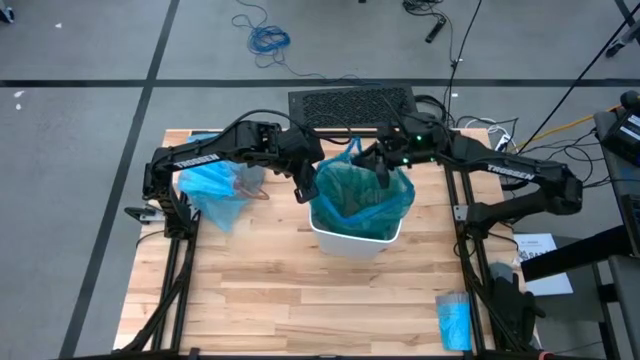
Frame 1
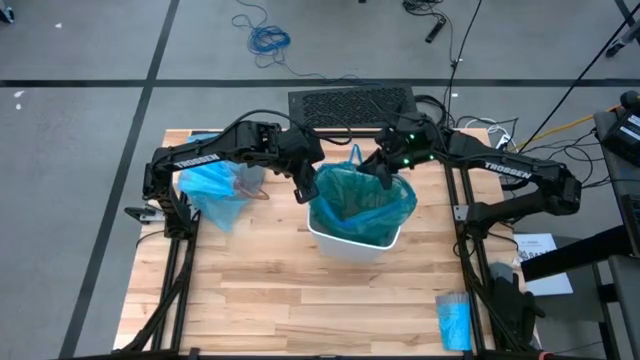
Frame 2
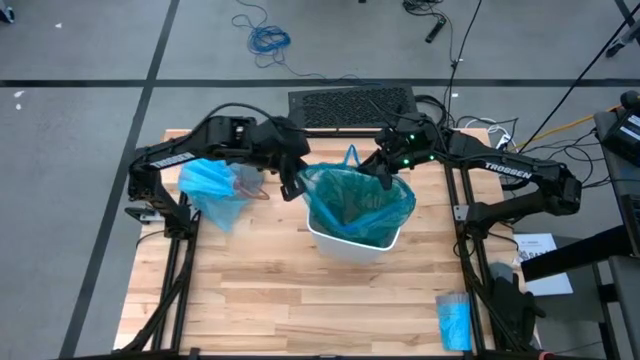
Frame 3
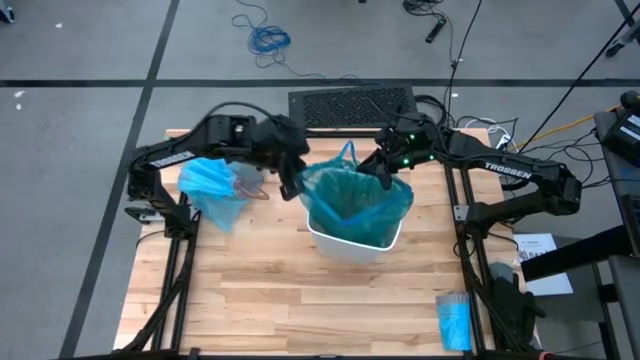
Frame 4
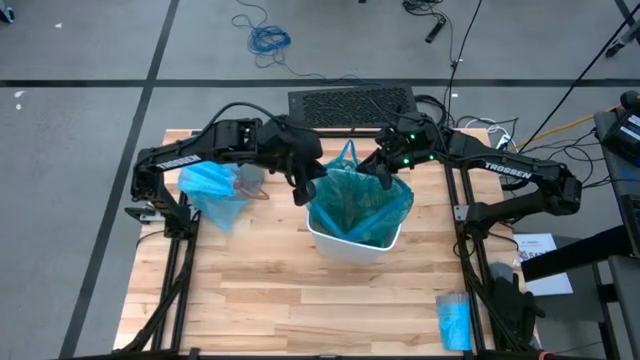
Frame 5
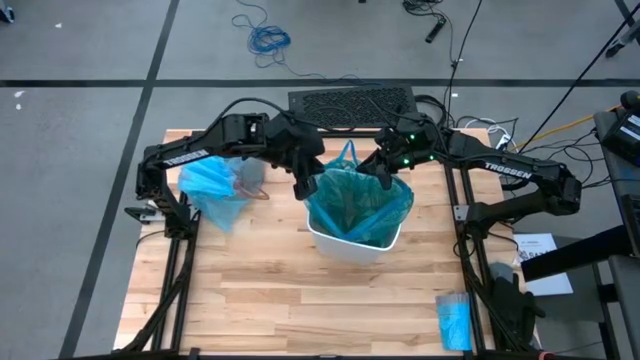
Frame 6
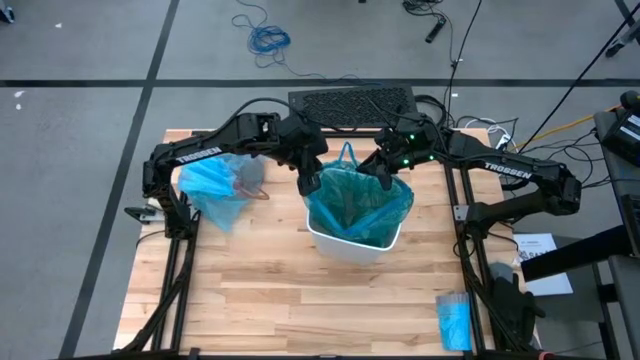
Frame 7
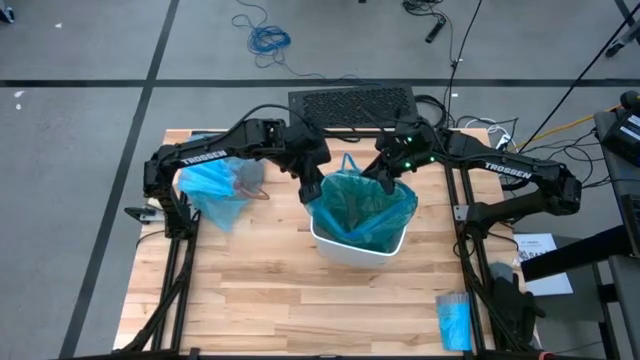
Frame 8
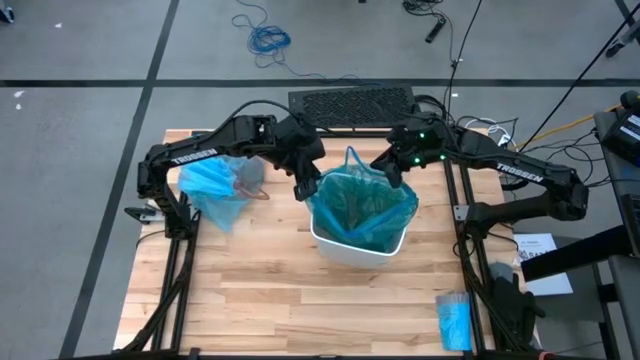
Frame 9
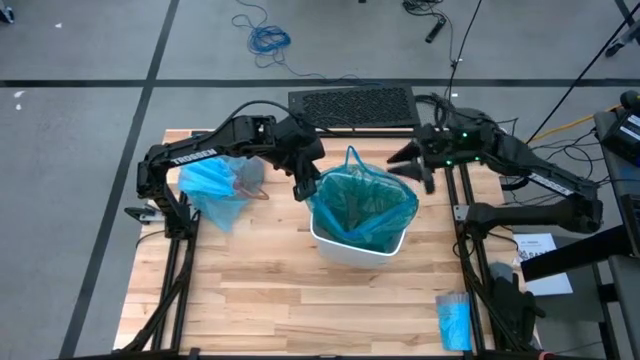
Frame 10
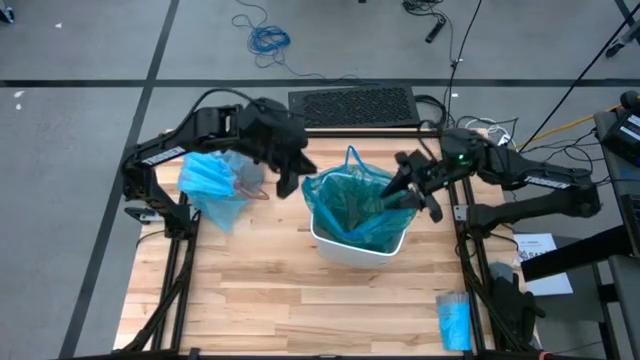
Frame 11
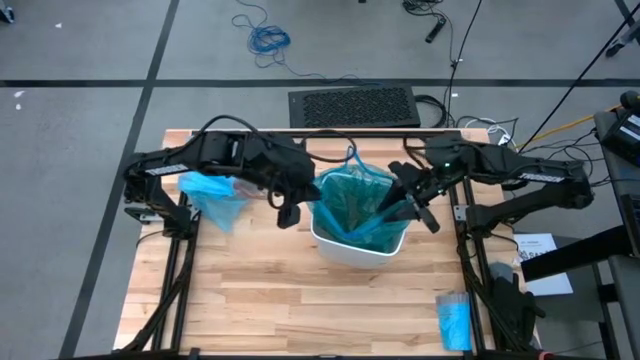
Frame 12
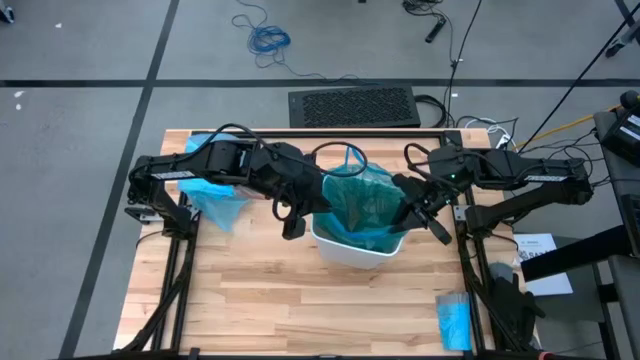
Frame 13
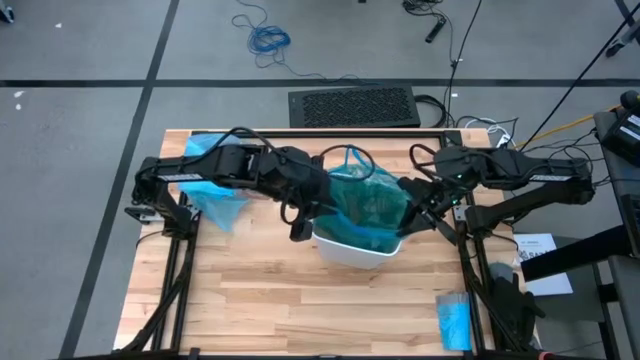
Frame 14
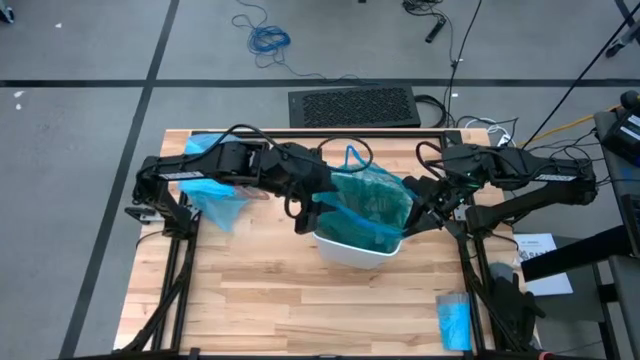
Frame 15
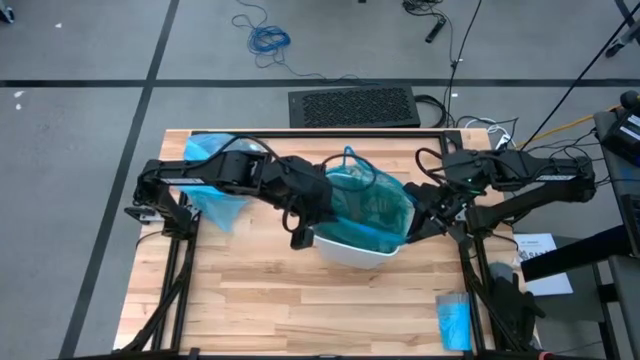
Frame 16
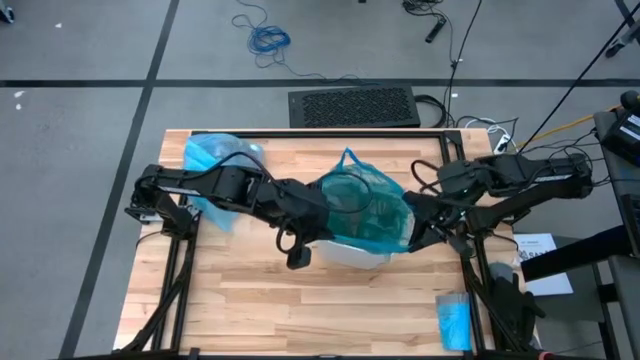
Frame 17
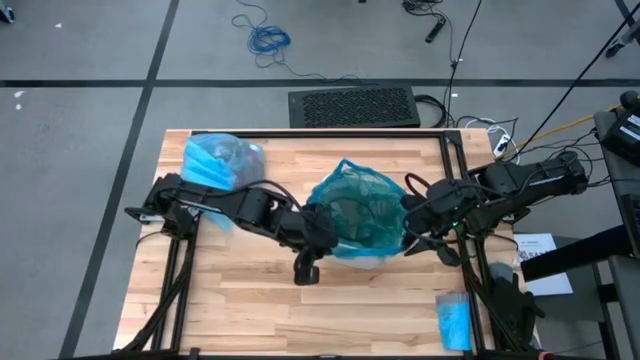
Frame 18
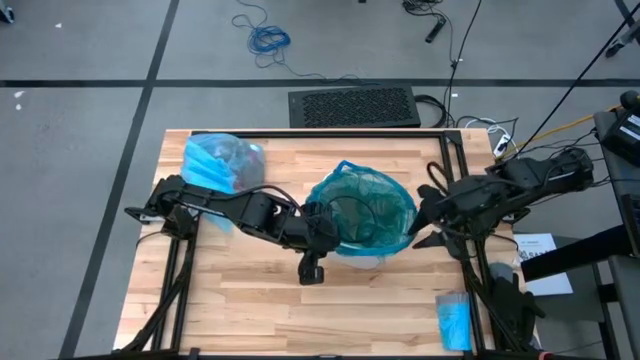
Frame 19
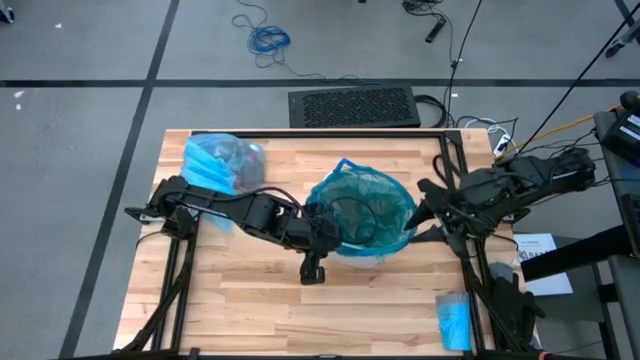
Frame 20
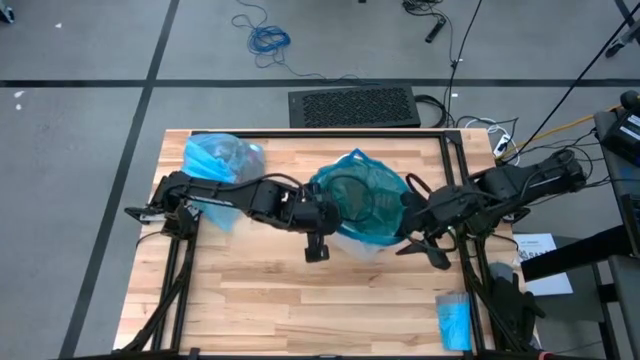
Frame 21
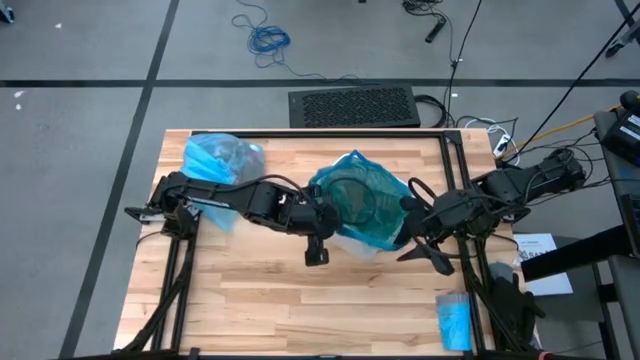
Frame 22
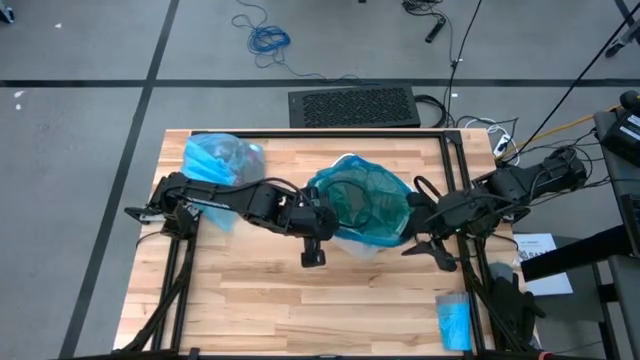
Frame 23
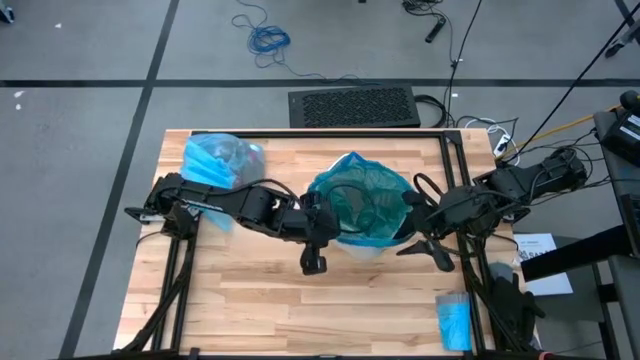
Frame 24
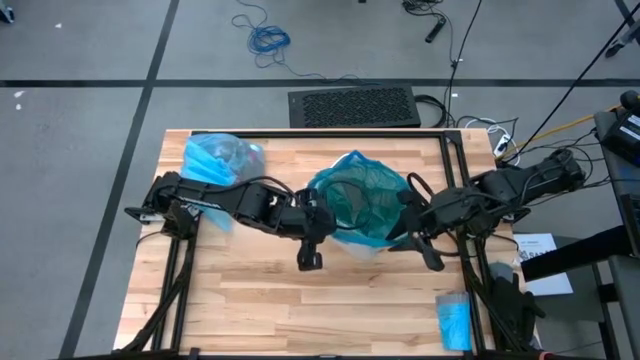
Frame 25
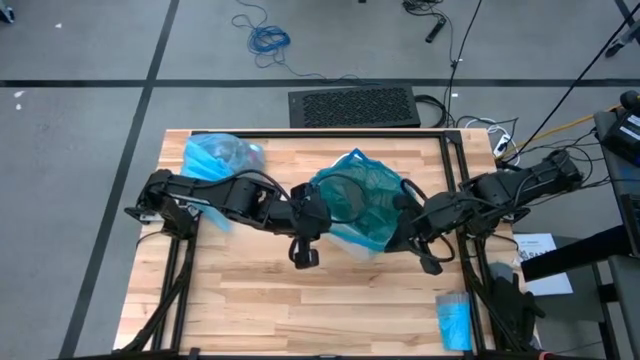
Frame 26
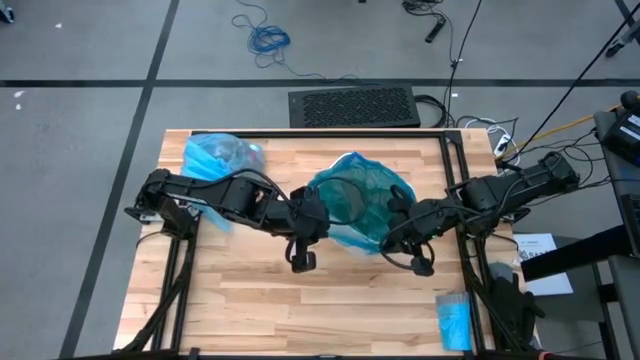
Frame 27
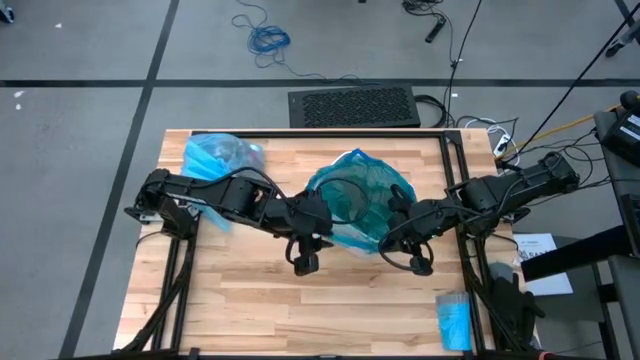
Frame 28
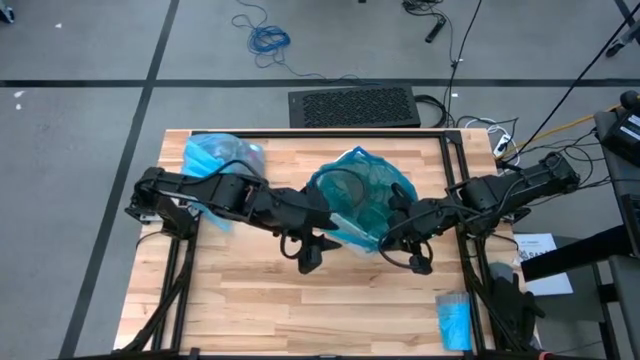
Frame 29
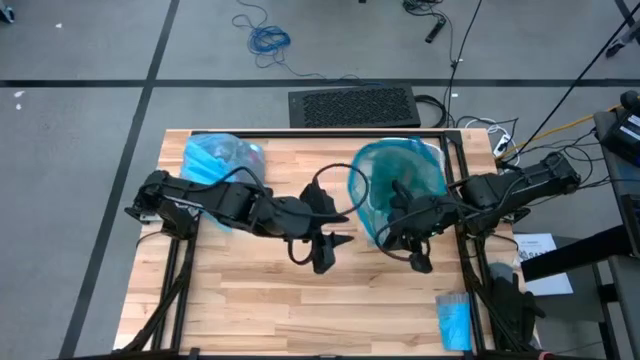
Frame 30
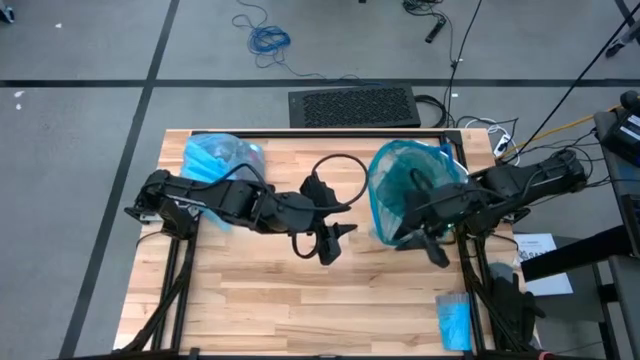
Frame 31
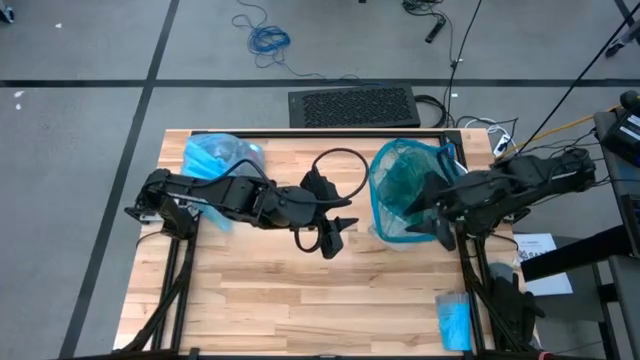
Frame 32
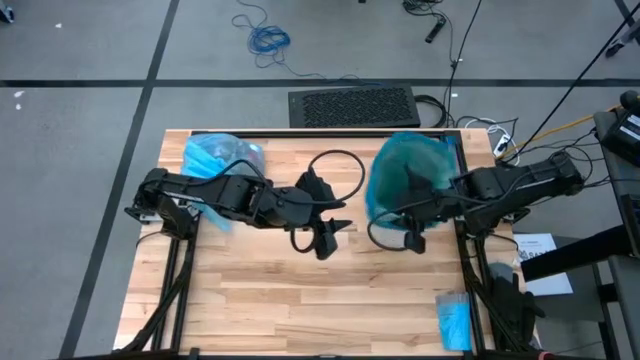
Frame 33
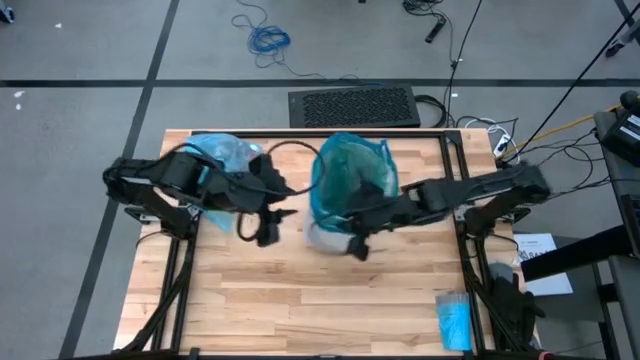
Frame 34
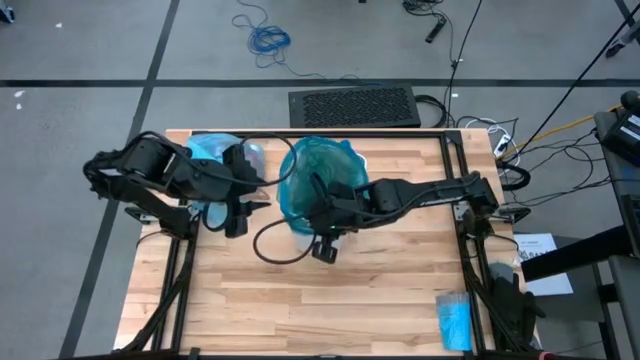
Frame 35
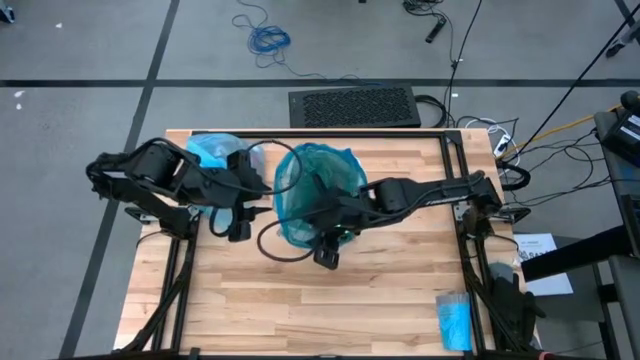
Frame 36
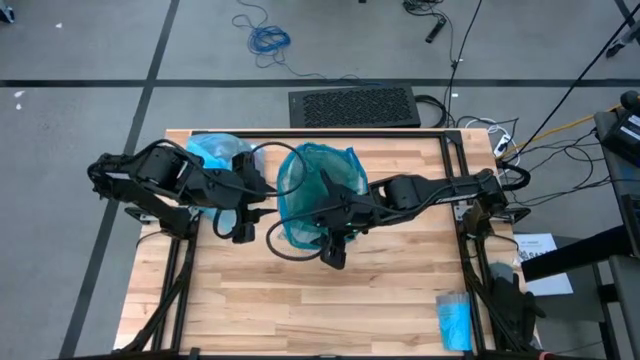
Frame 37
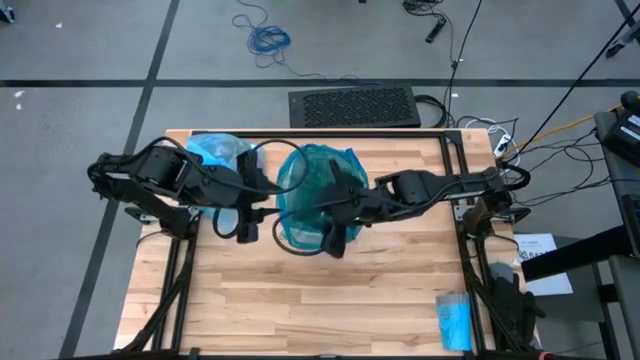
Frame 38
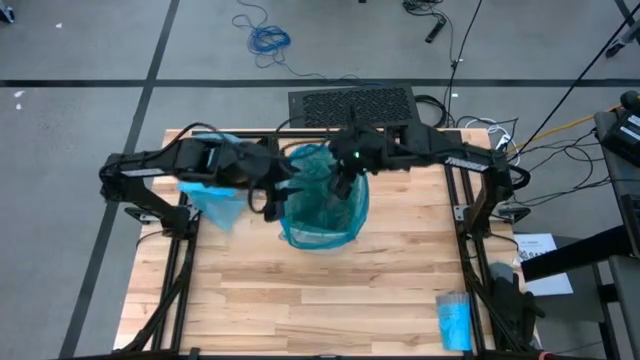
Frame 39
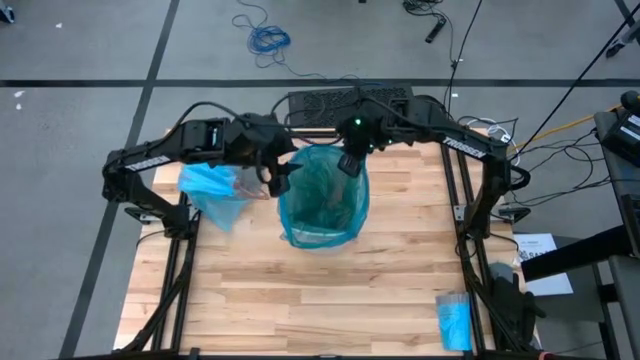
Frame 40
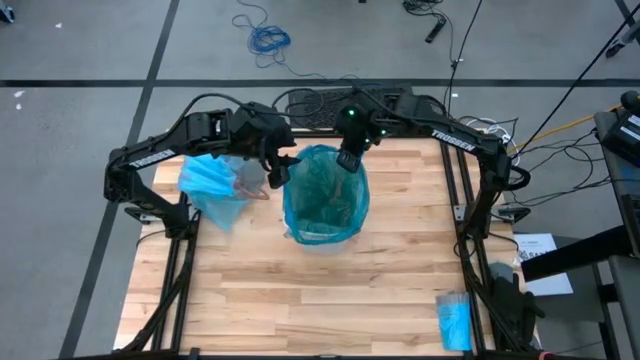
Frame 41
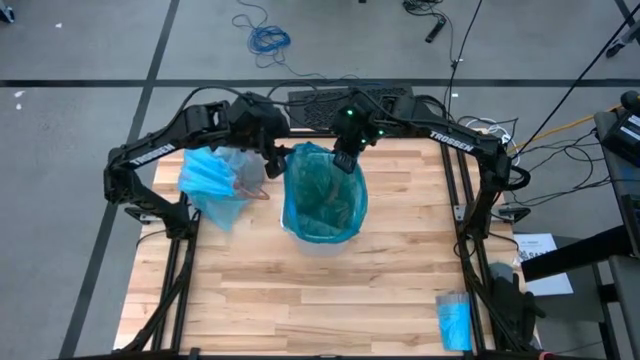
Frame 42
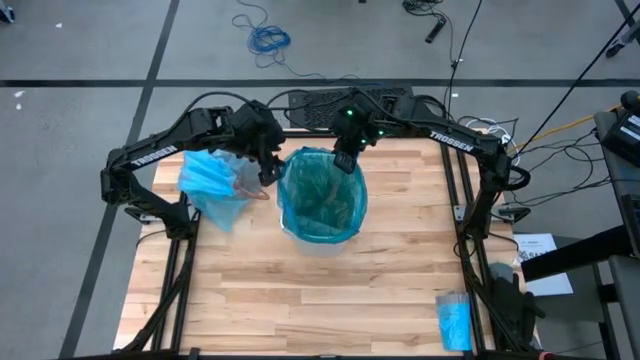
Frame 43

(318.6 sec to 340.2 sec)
Task: place trash/remove bag and relplace
Insert the new blue trash bag into the white trash bin
